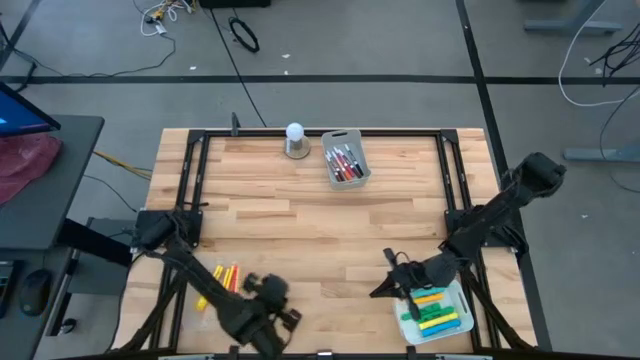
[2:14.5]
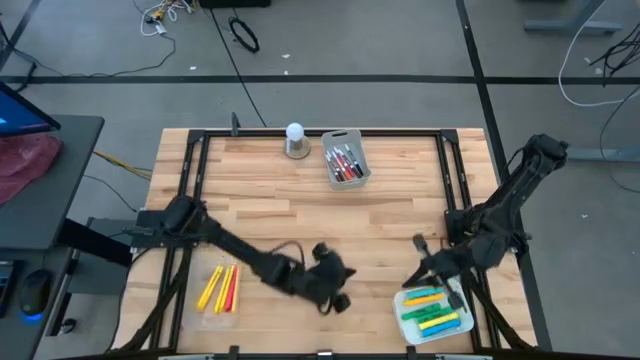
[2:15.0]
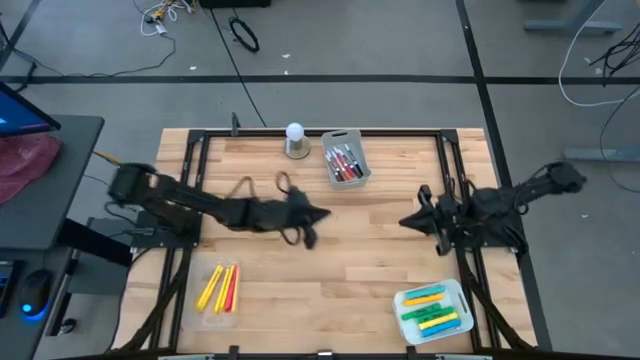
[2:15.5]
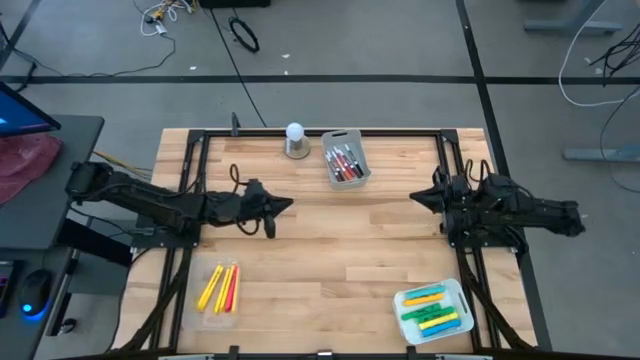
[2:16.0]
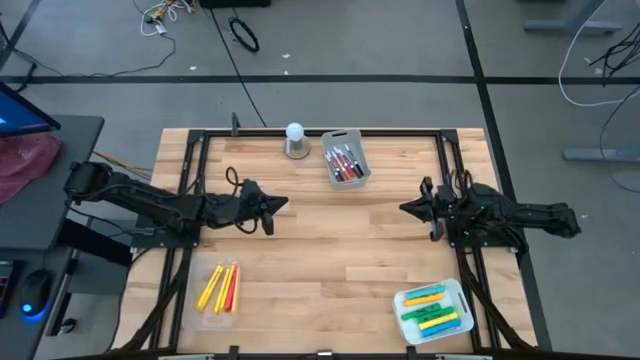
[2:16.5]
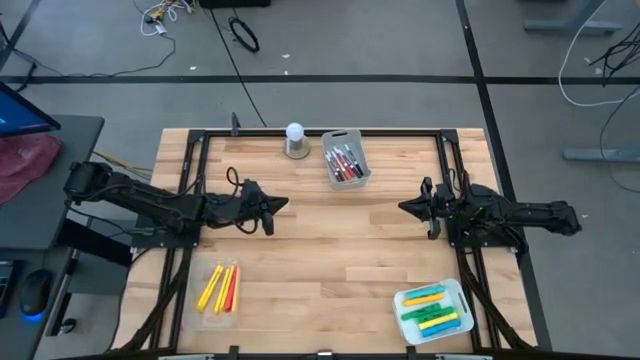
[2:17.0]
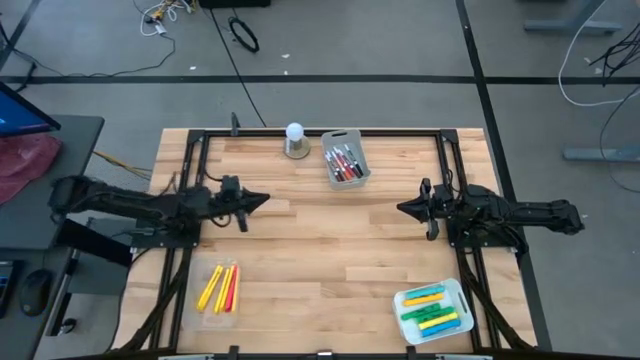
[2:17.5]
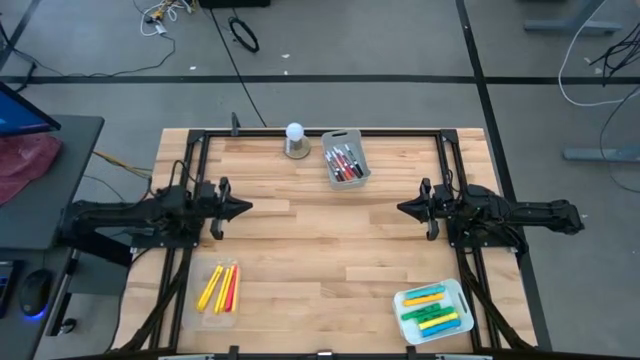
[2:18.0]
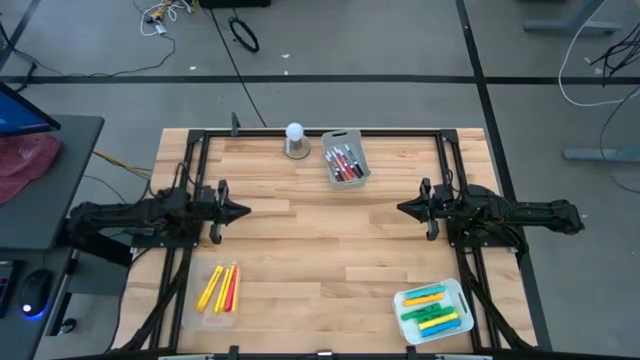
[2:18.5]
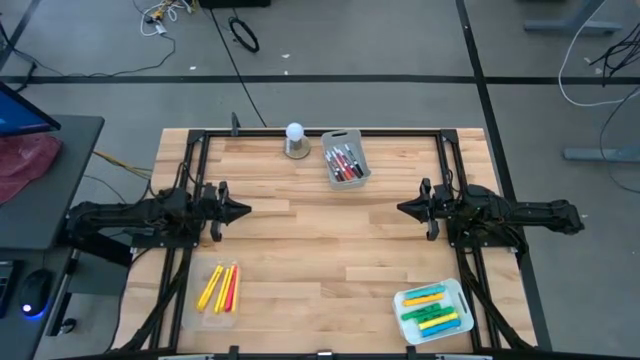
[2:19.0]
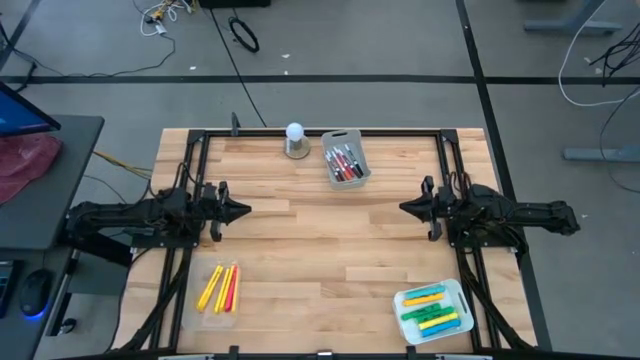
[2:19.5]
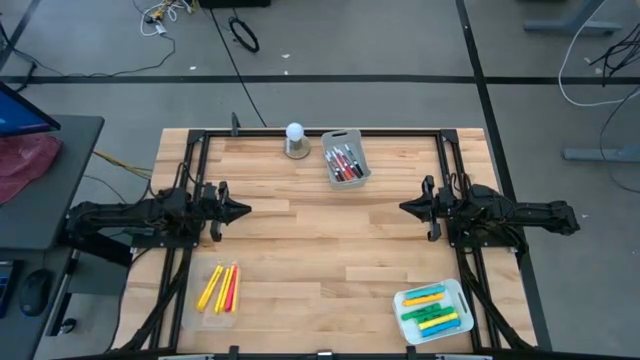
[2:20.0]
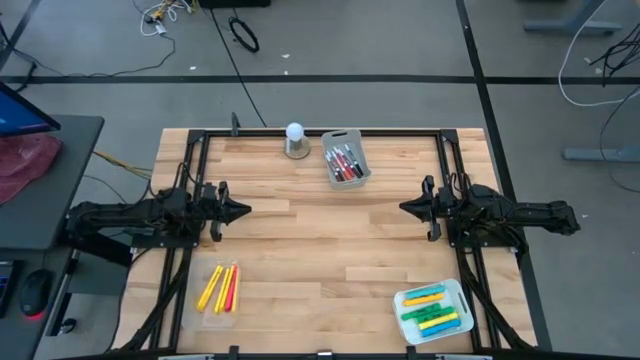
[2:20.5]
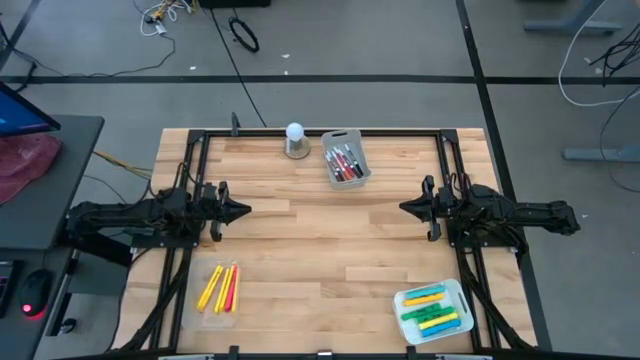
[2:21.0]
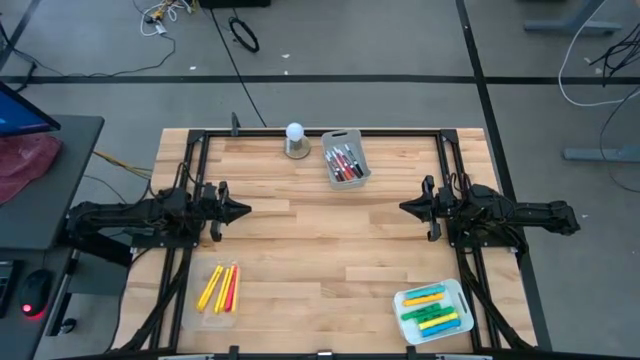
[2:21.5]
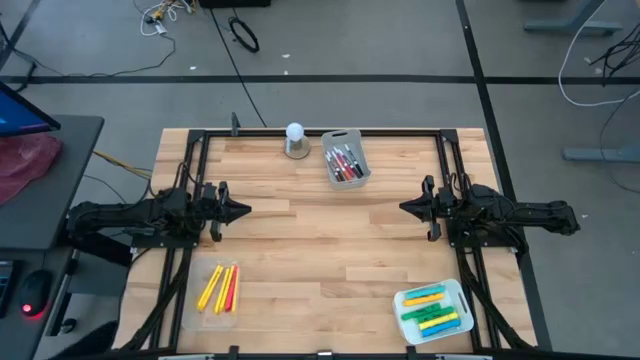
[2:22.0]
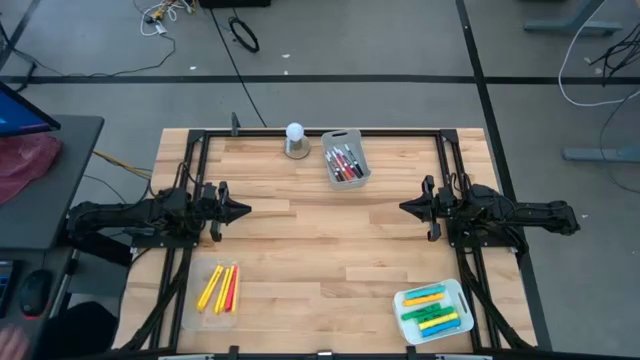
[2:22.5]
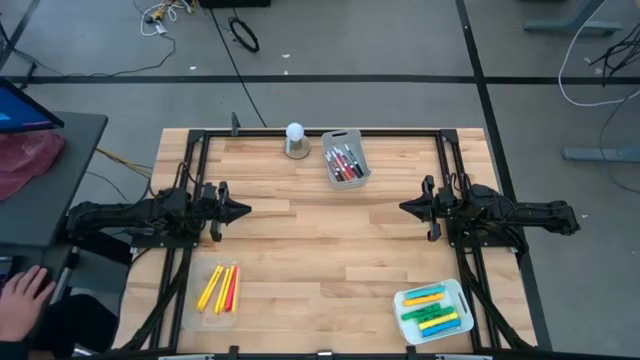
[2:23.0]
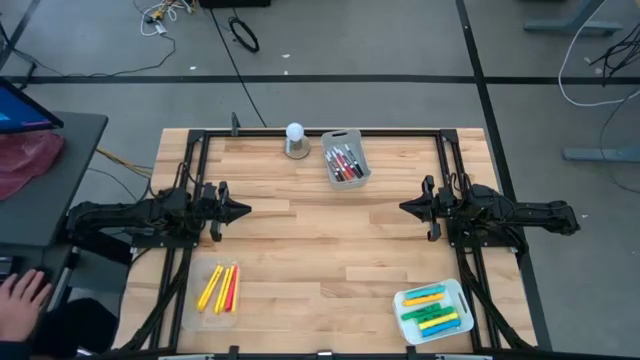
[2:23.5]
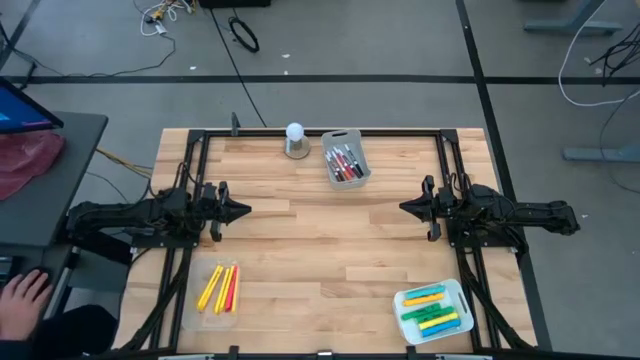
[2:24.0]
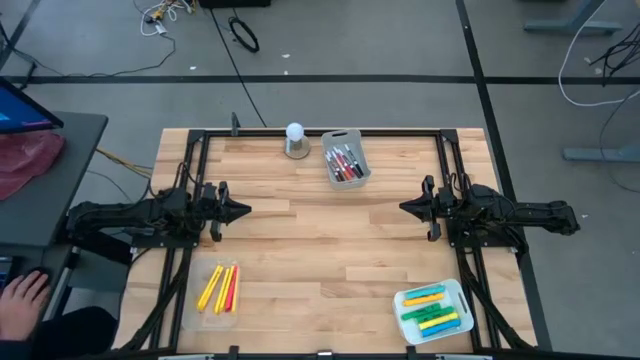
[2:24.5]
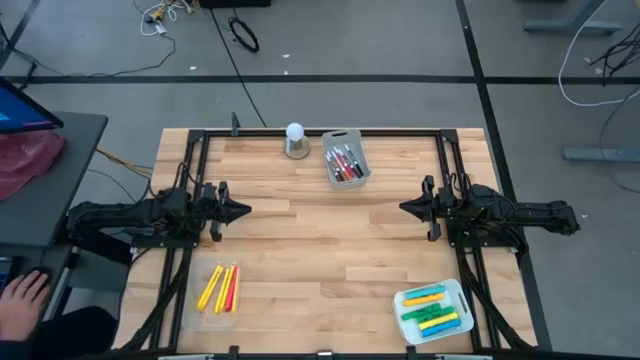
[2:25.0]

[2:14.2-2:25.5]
Task: Pick & Place Markers
Return to Home Position

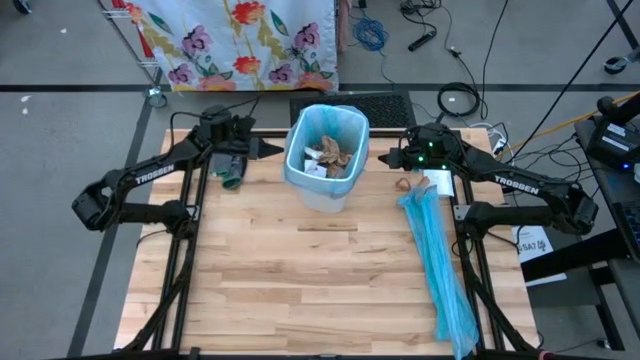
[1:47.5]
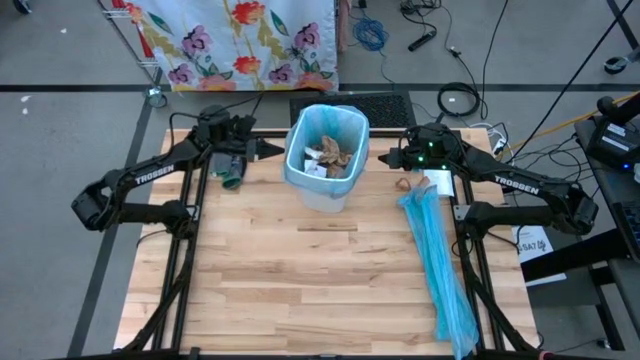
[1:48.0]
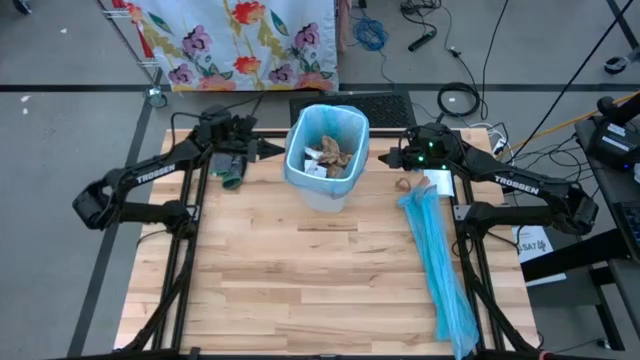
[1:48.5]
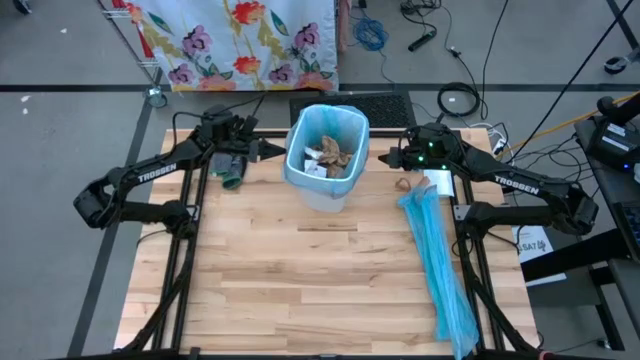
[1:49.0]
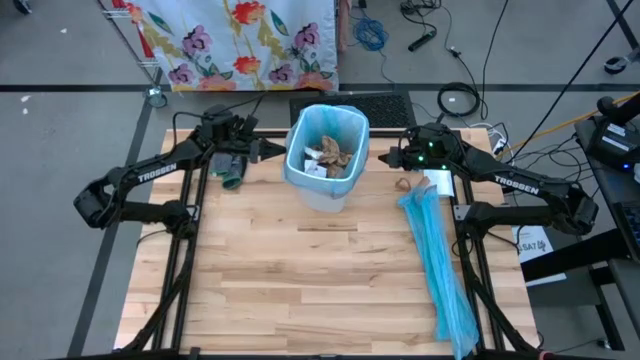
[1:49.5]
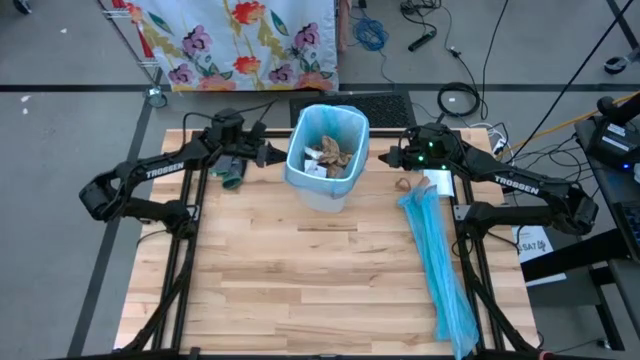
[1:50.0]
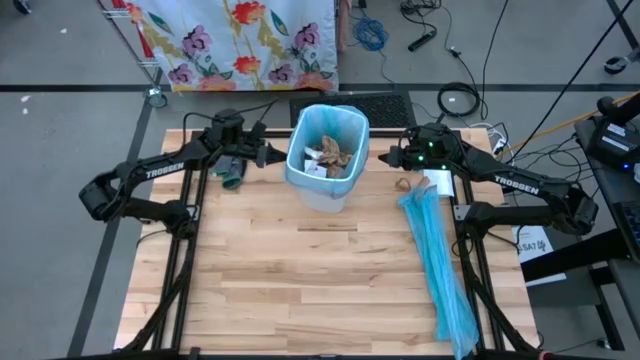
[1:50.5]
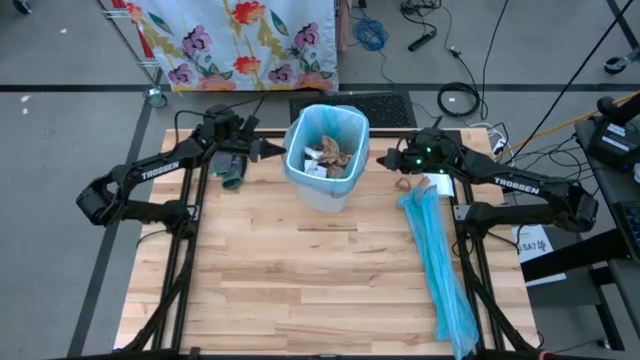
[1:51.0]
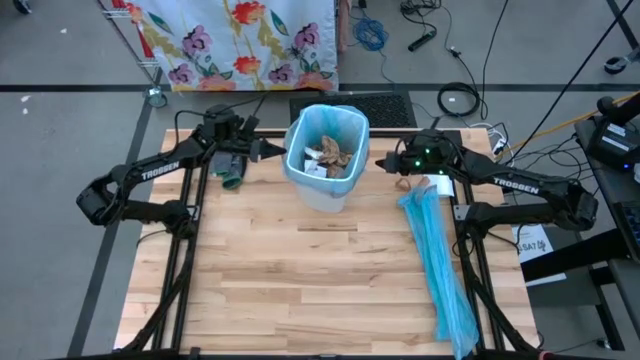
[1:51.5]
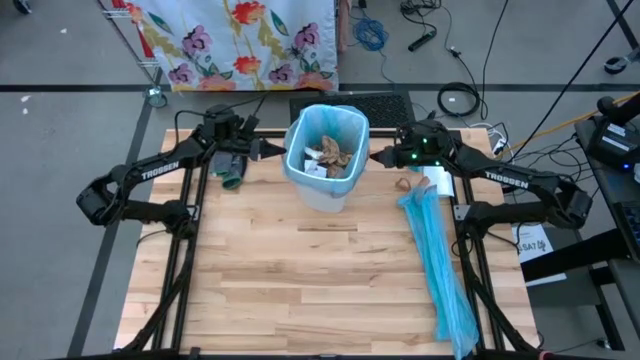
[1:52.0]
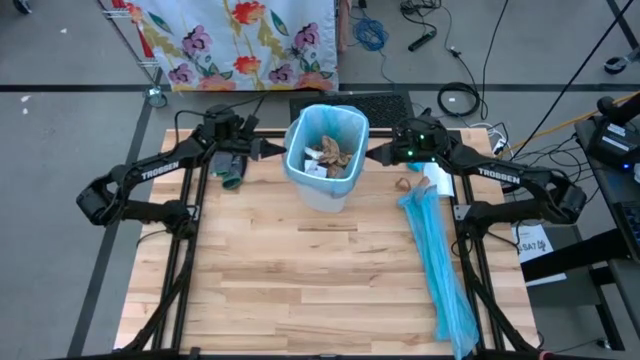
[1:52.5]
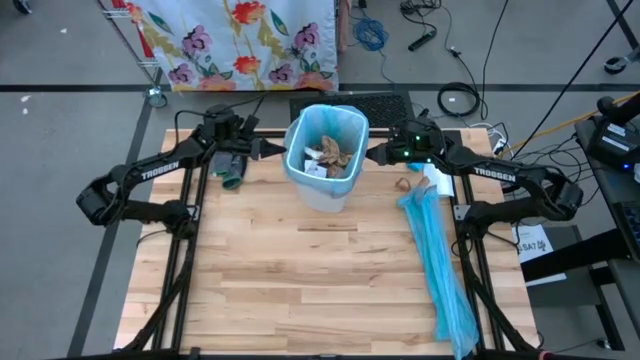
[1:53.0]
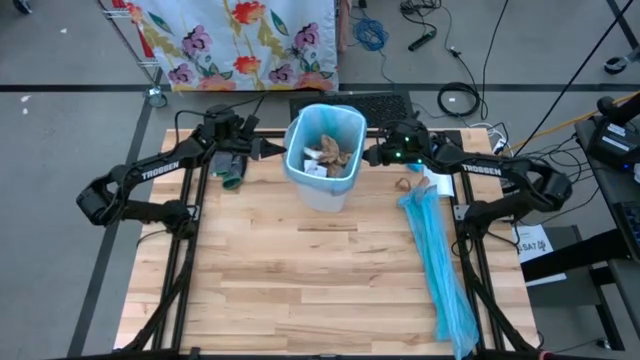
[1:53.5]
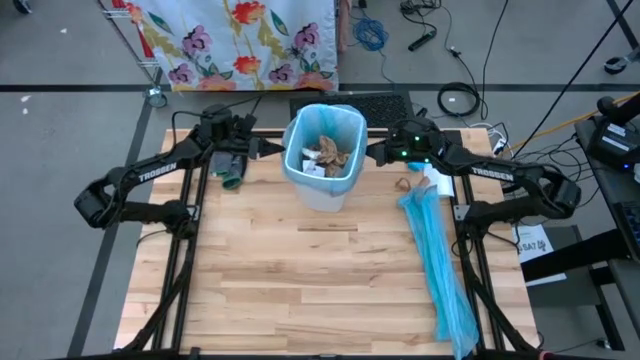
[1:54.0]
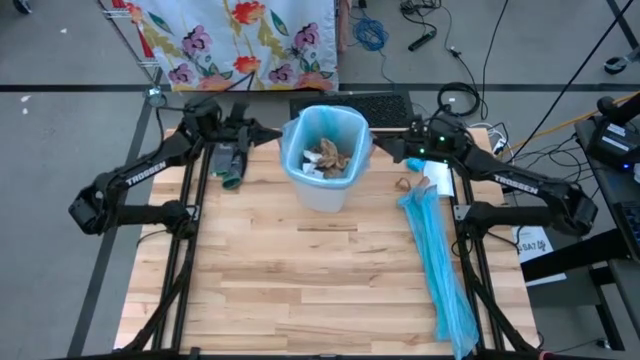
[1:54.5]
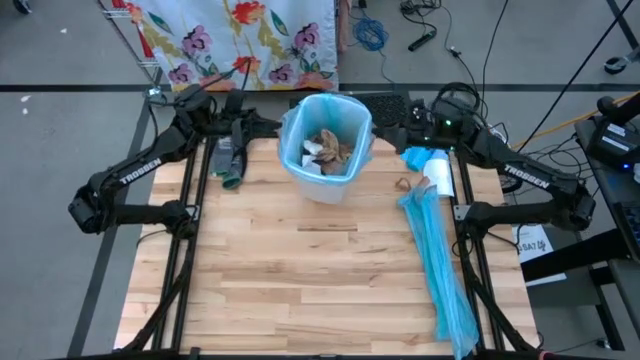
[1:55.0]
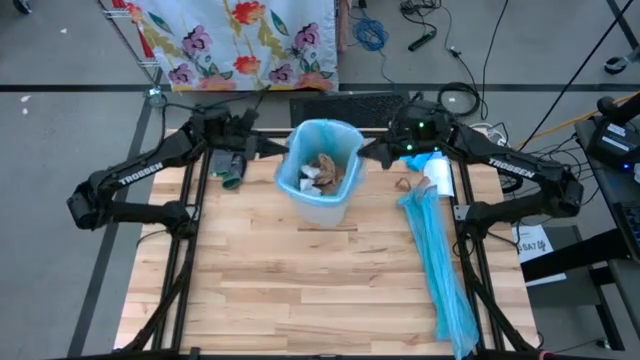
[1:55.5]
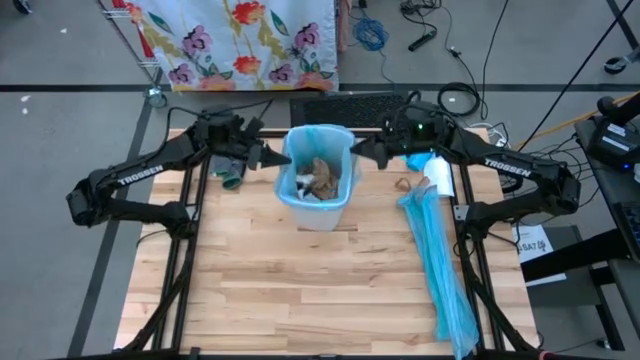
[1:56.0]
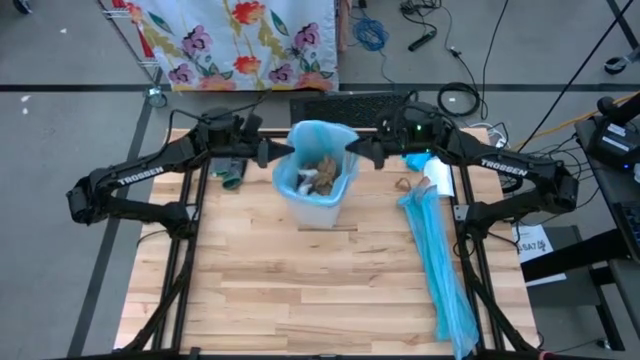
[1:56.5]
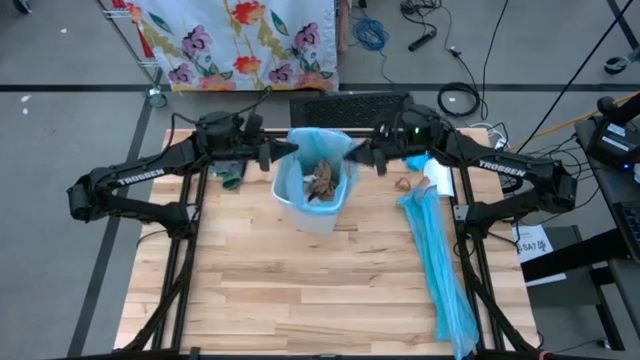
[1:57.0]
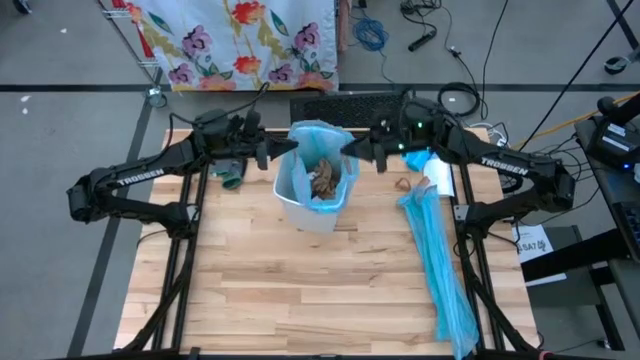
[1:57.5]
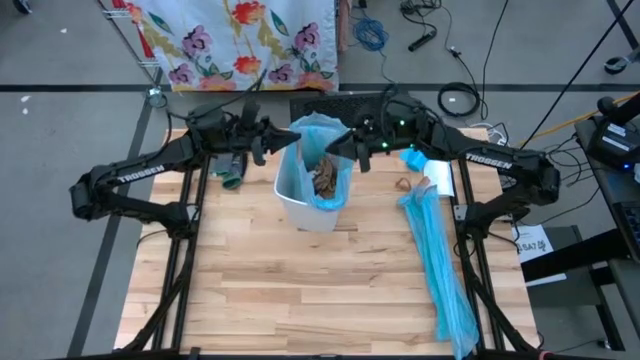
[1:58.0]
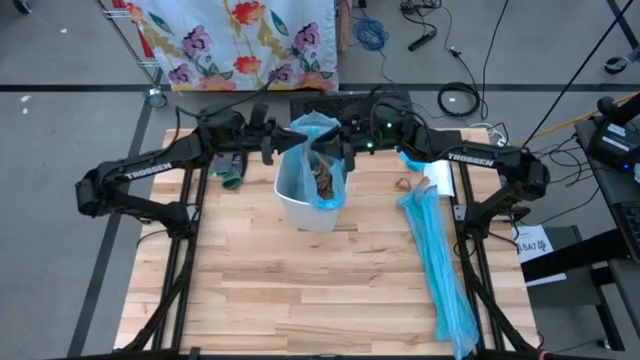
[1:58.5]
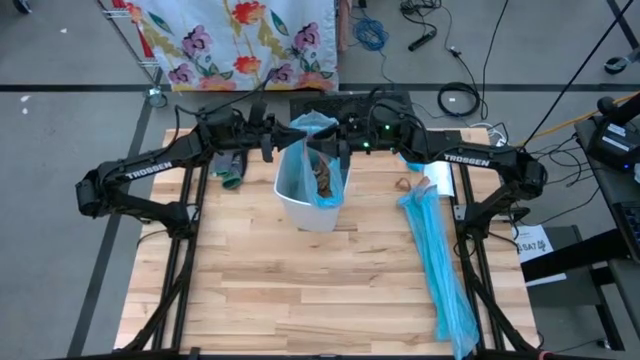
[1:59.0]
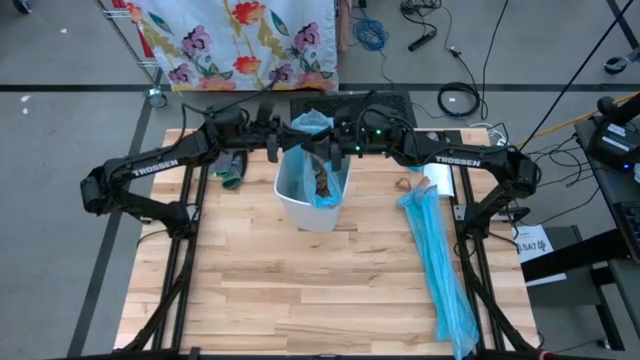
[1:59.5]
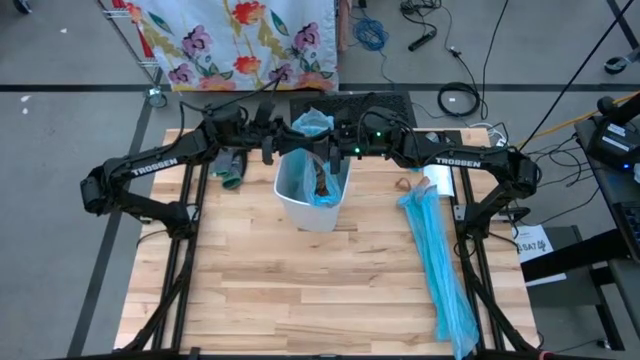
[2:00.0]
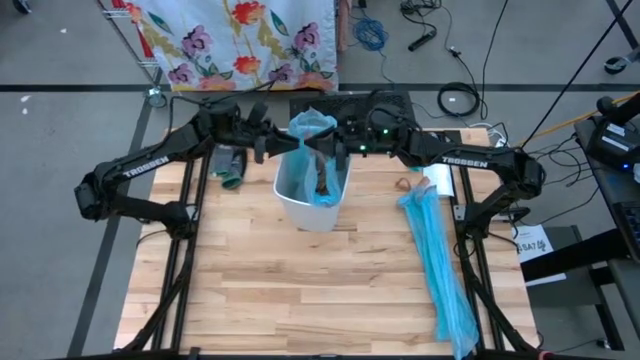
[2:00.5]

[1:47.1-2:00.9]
Task: place trash/remove bag and relplace
Remove the blue trash bag from the trash bin
